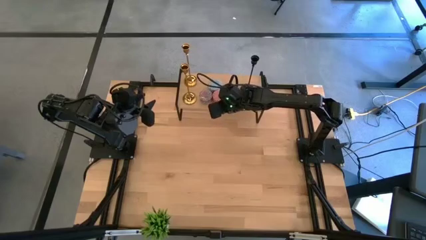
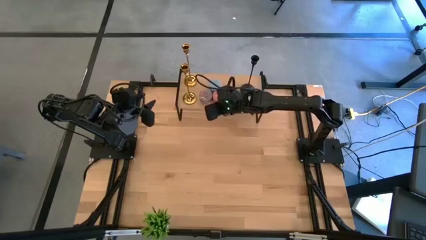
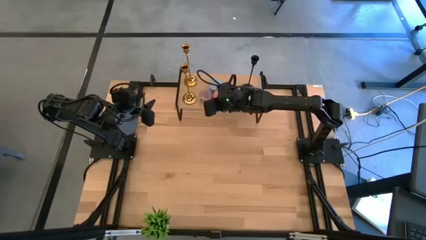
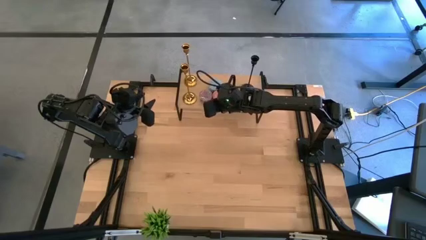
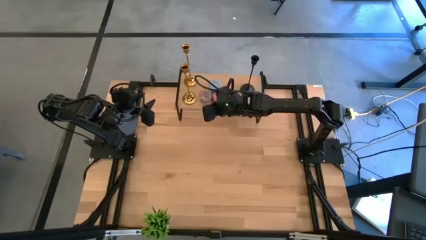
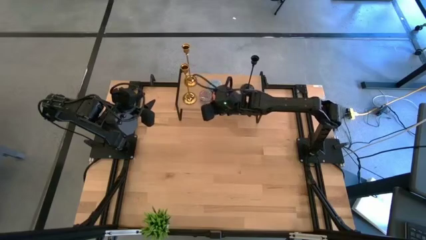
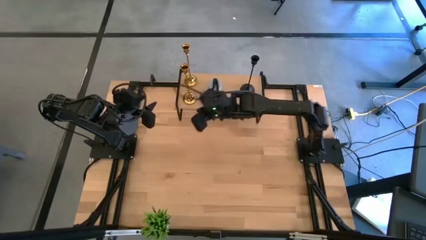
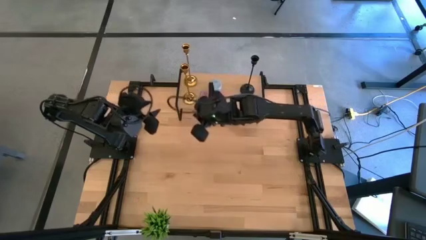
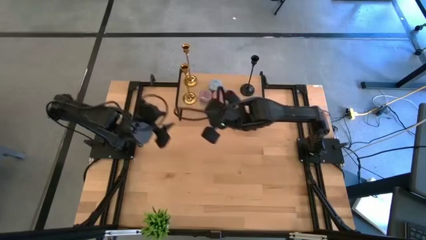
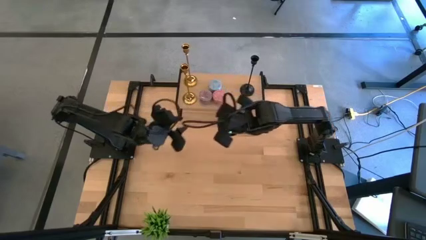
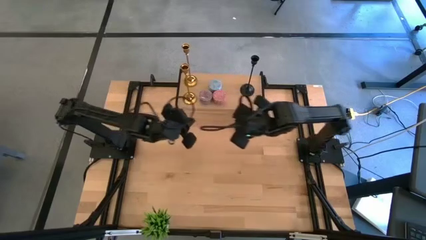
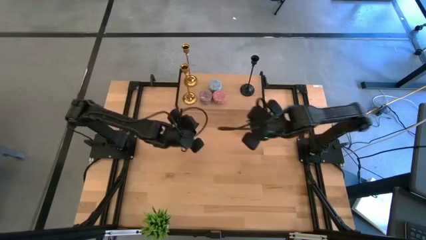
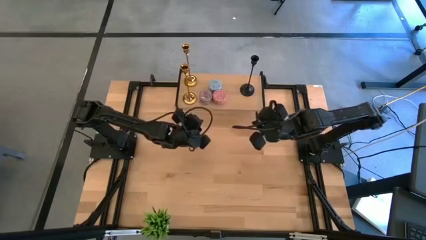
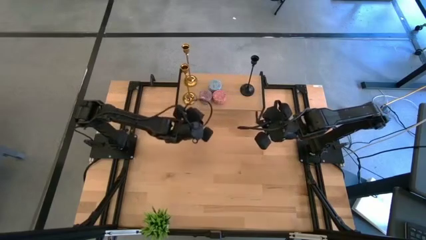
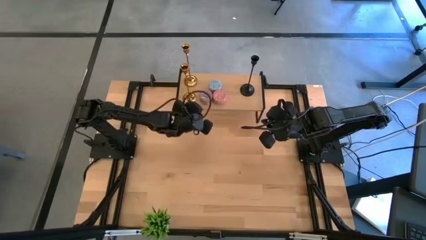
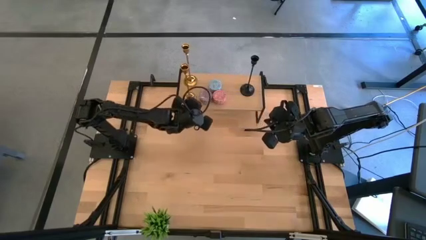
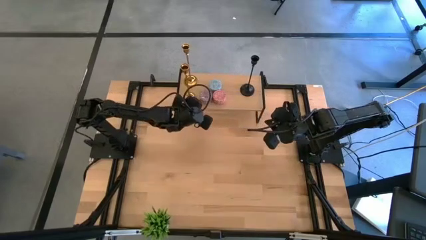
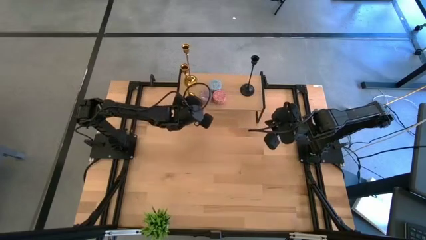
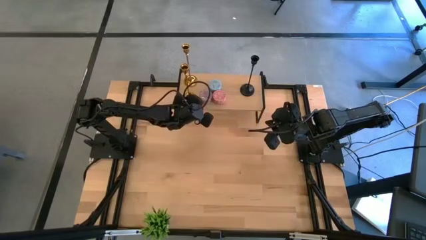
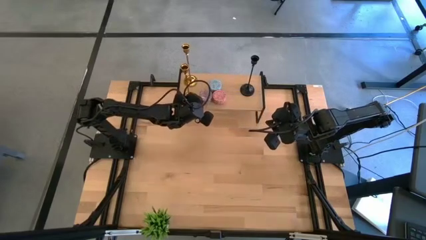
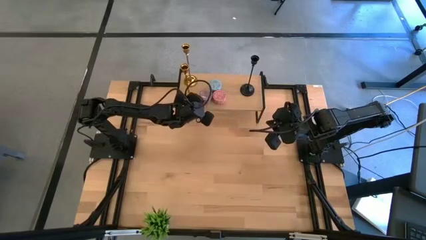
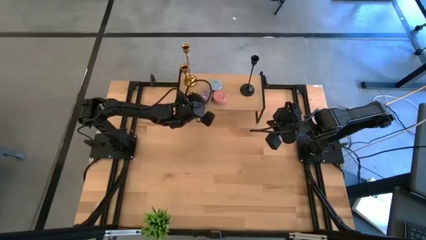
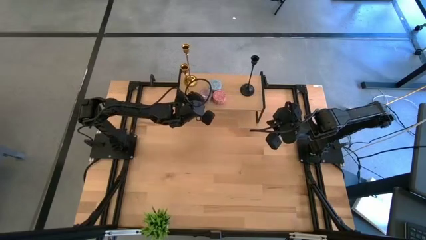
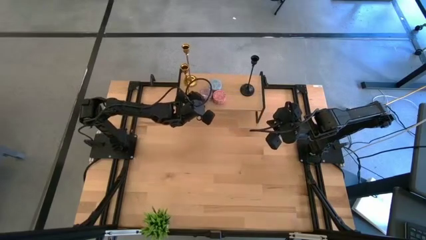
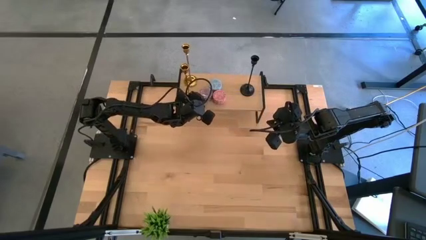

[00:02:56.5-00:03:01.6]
Task: Pick & Place candle stick holders
Adjust the red scented candle on the shelf

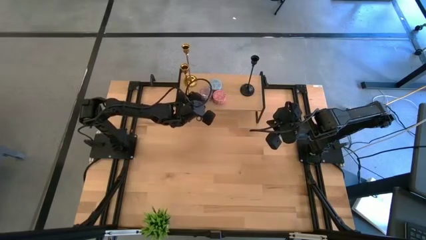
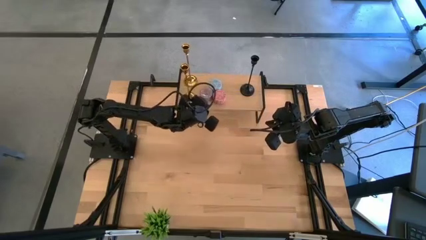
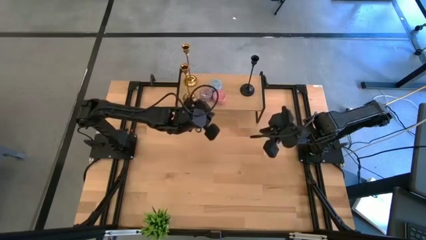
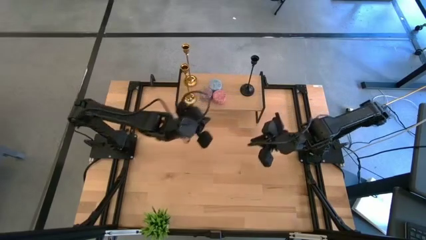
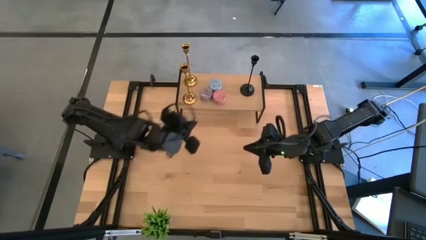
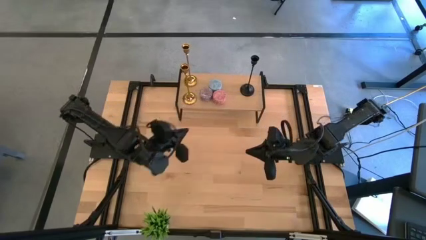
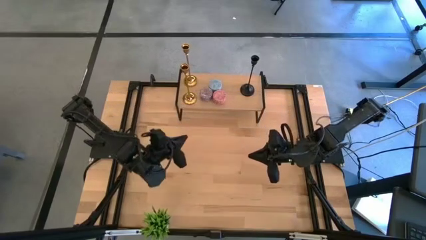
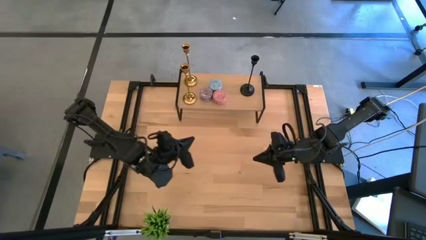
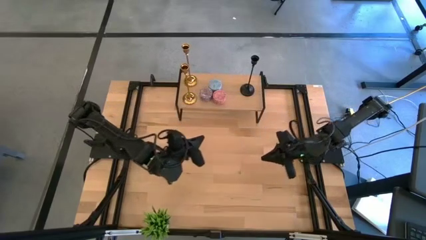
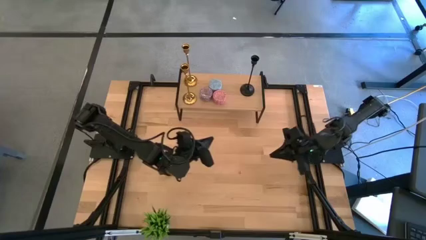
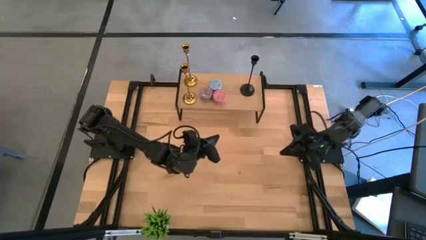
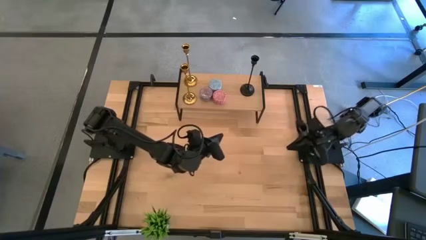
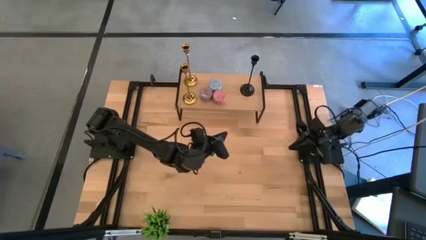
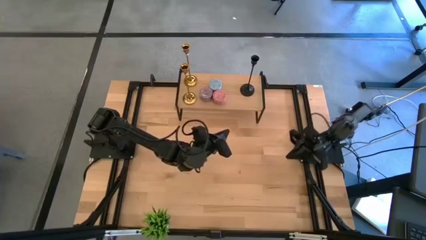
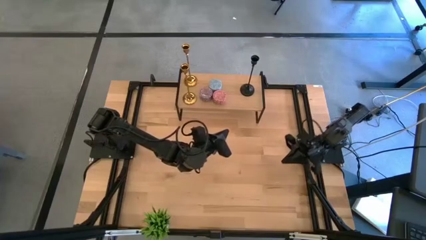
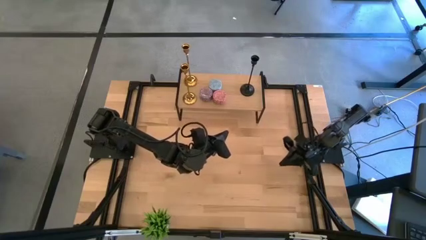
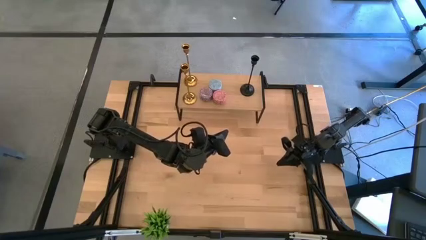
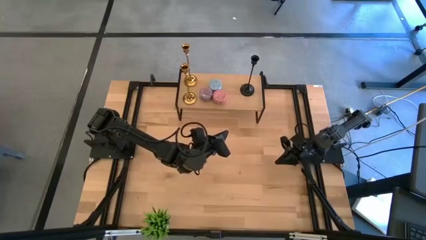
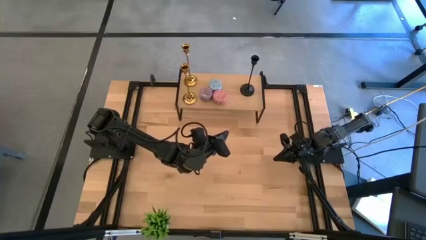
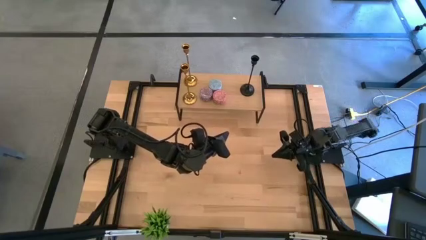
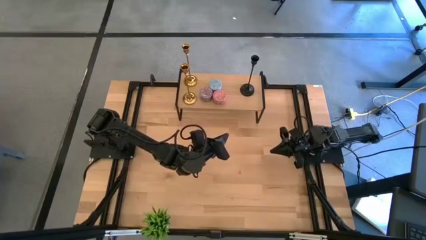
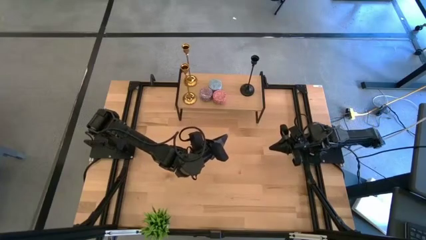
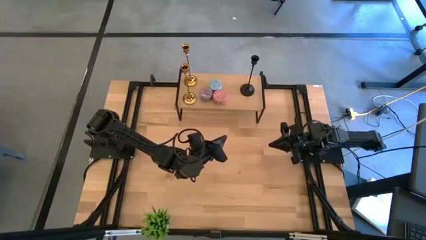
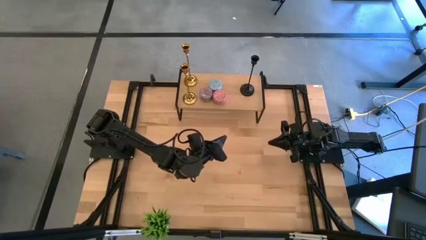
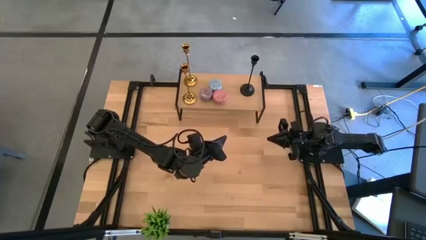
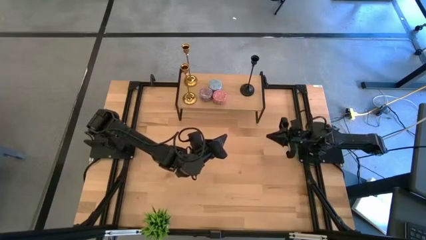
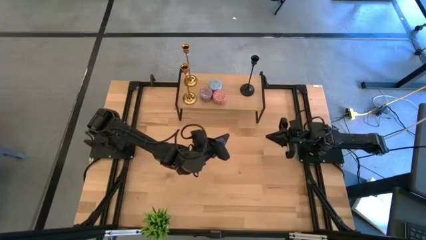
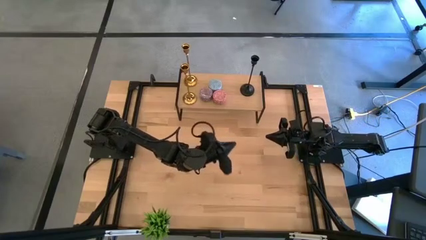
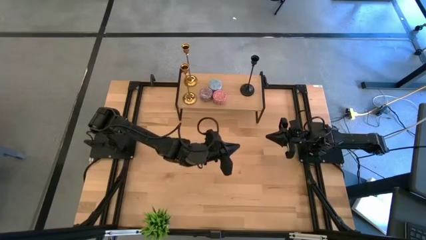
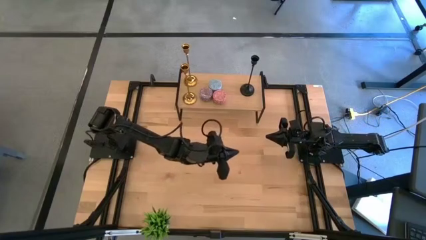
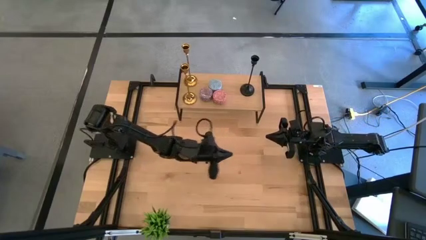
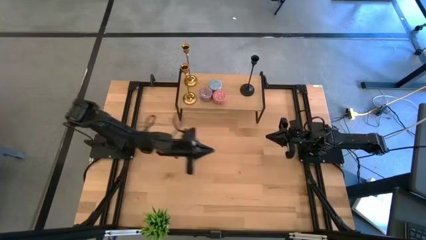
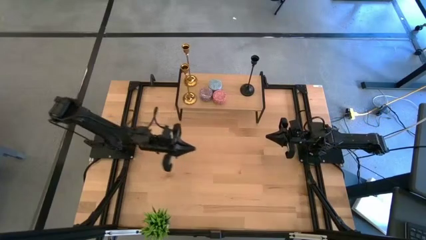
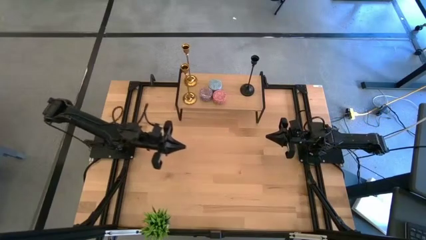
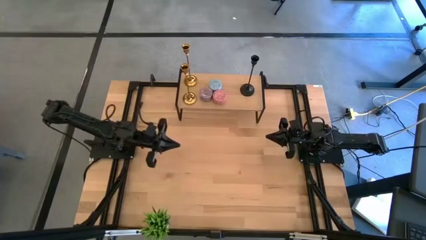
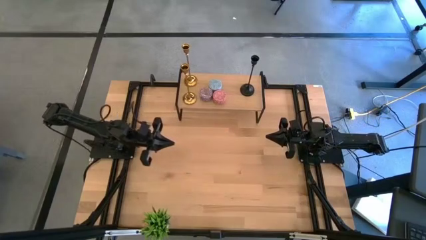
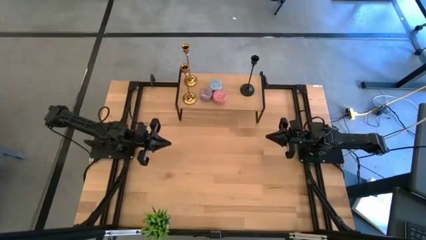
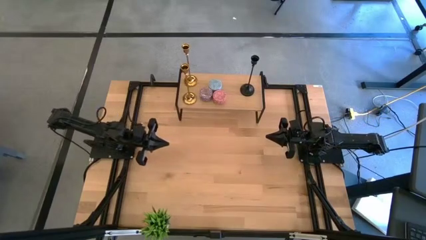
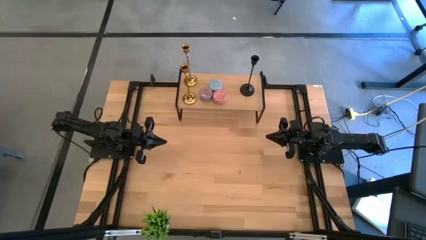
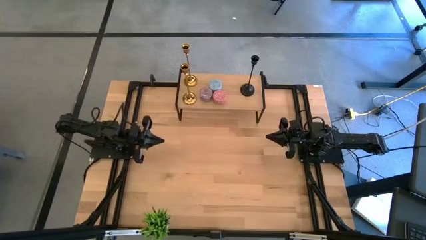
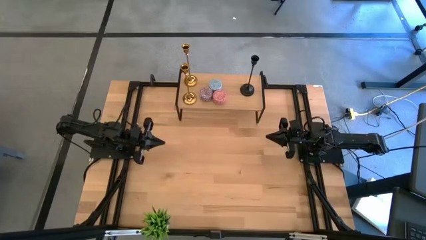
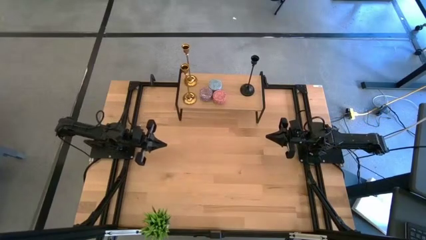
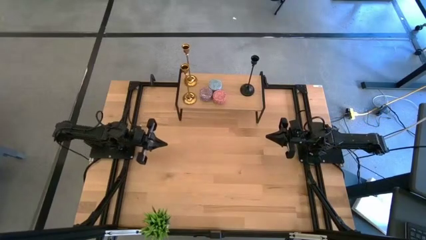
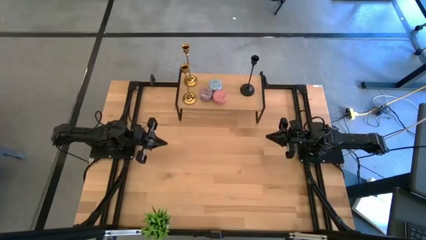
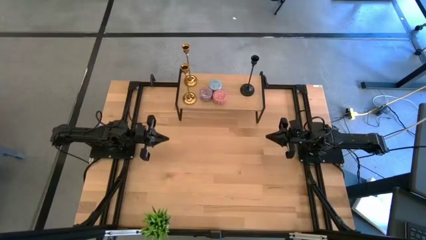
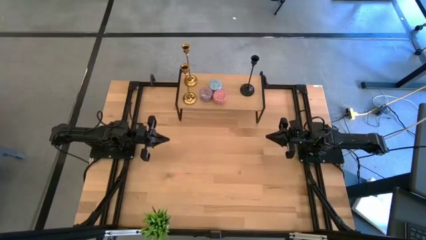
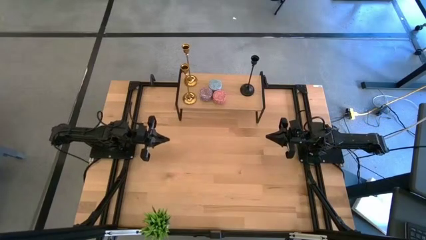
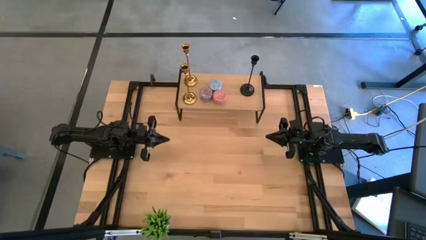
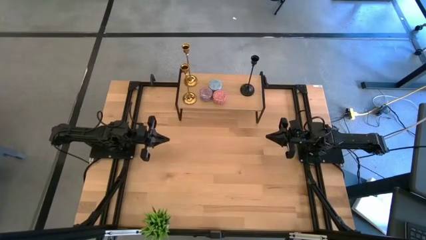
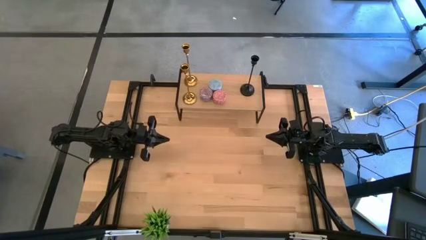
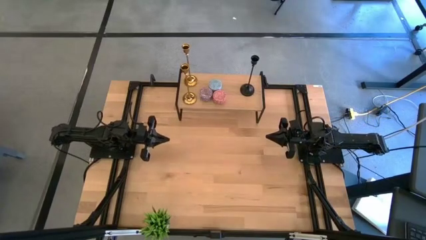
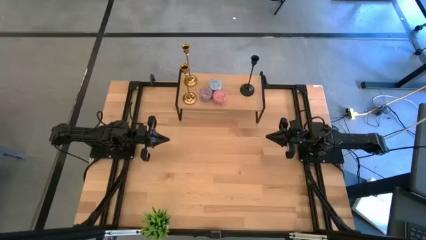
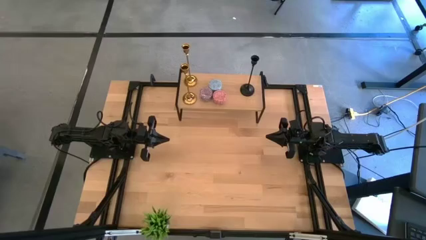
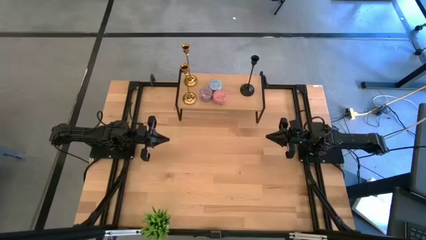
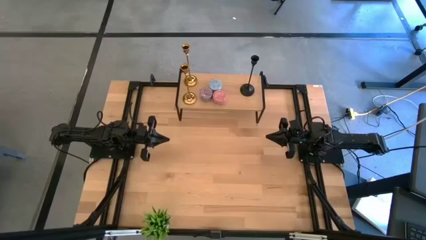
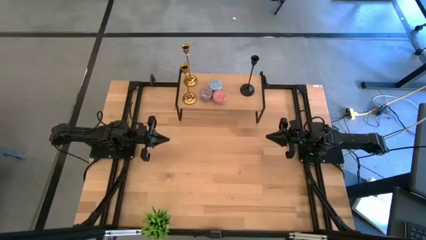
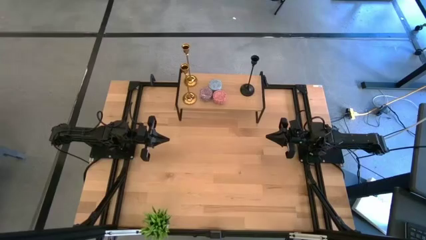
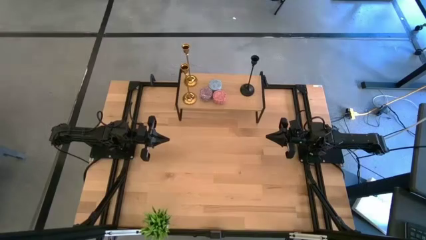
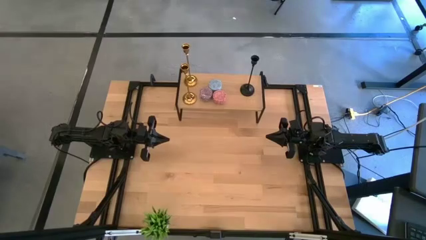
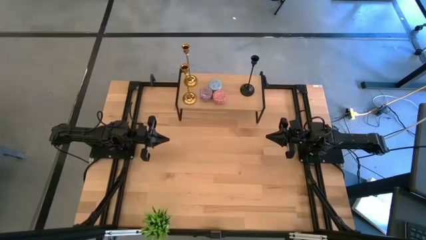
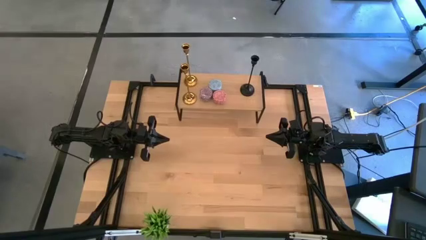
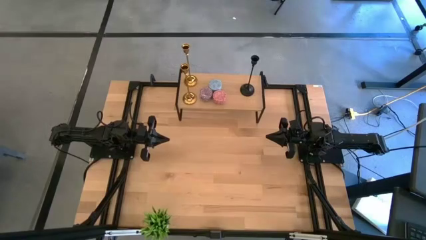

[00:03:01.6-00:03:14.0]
Return to Home Position
